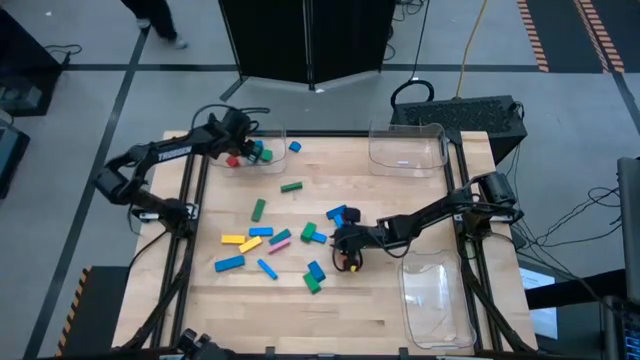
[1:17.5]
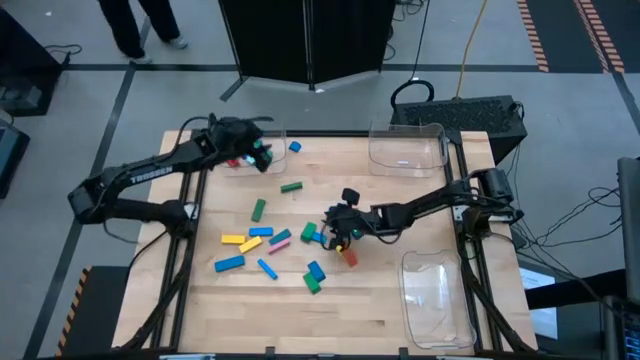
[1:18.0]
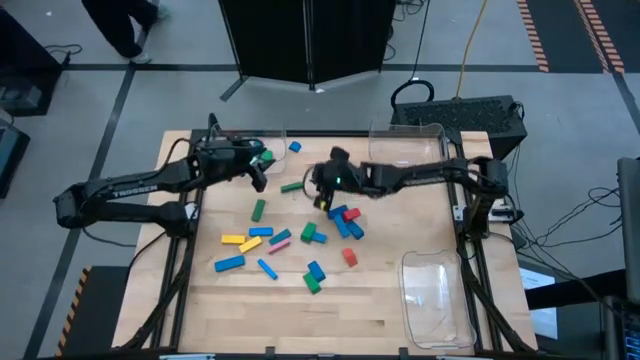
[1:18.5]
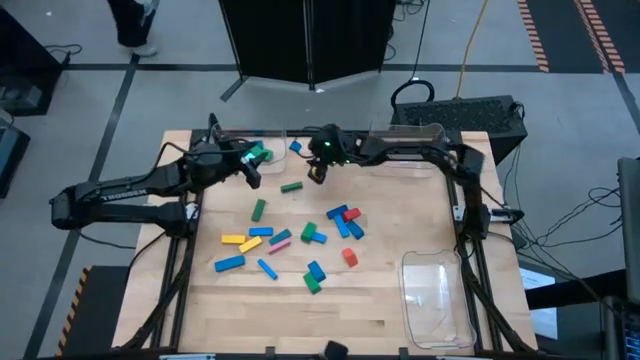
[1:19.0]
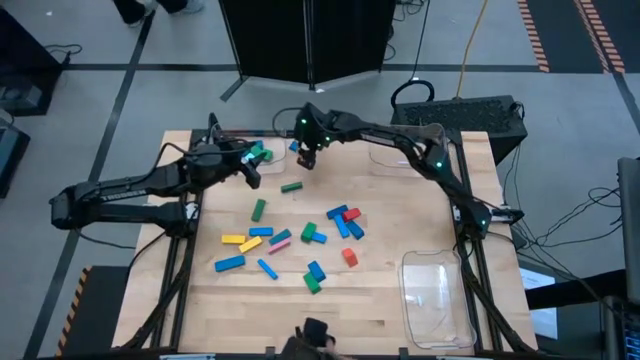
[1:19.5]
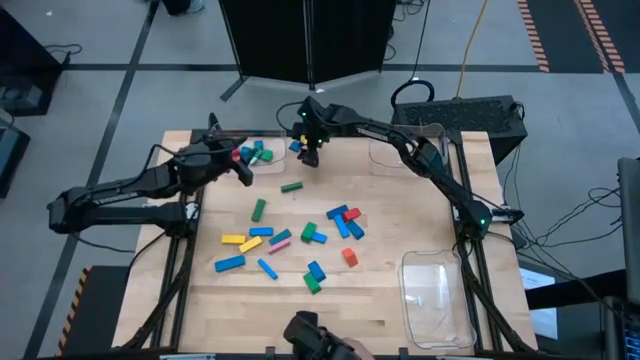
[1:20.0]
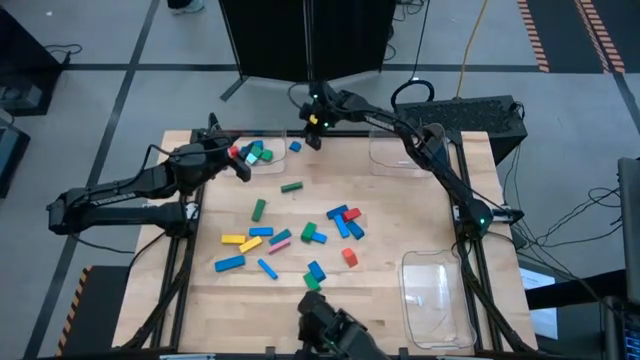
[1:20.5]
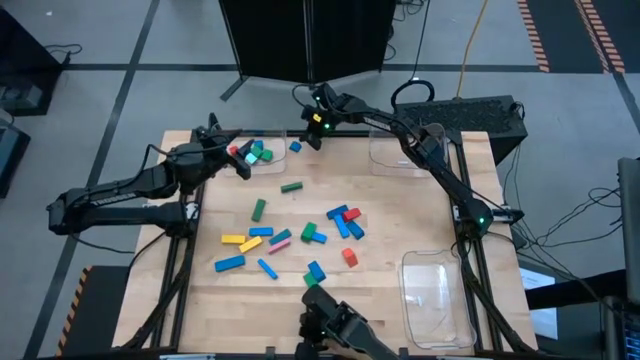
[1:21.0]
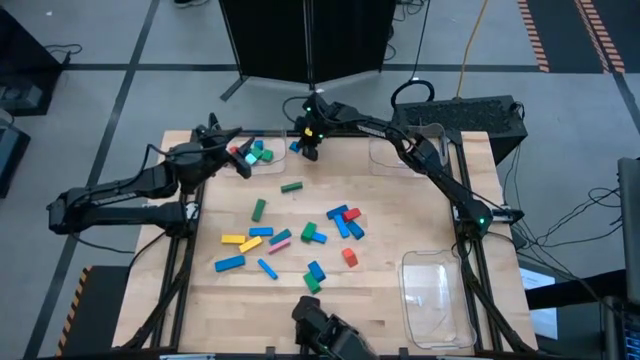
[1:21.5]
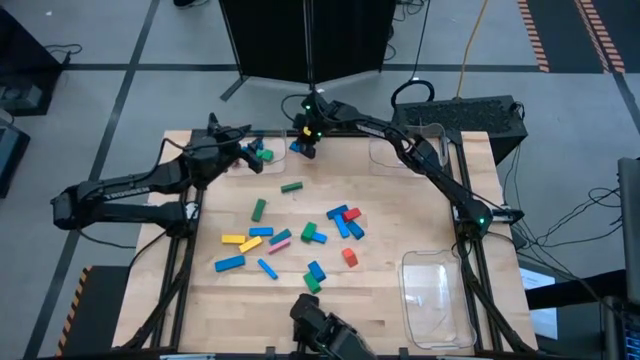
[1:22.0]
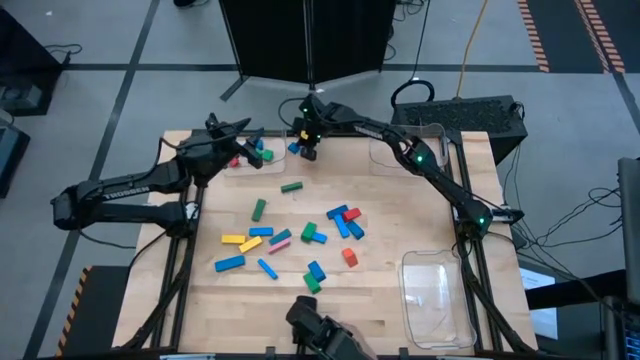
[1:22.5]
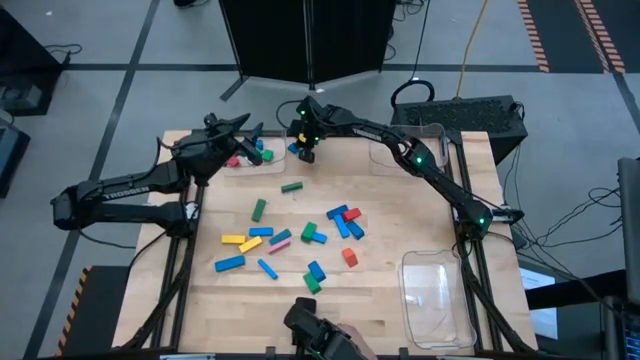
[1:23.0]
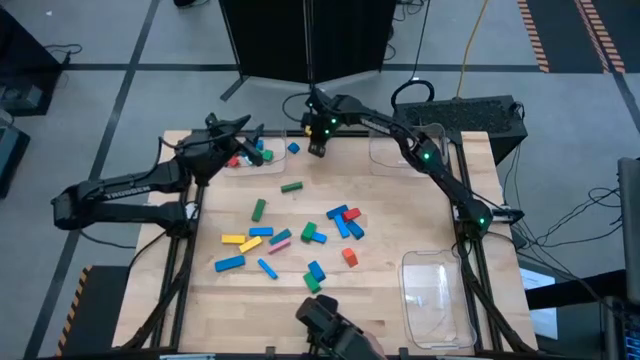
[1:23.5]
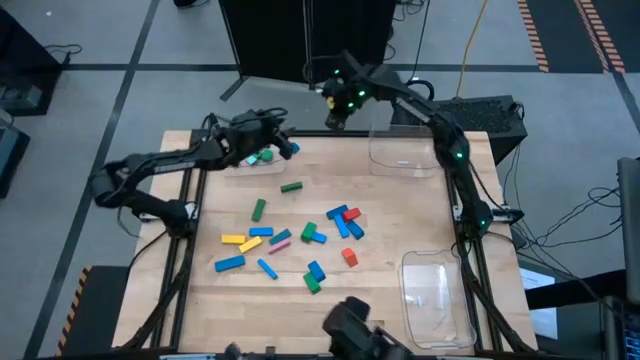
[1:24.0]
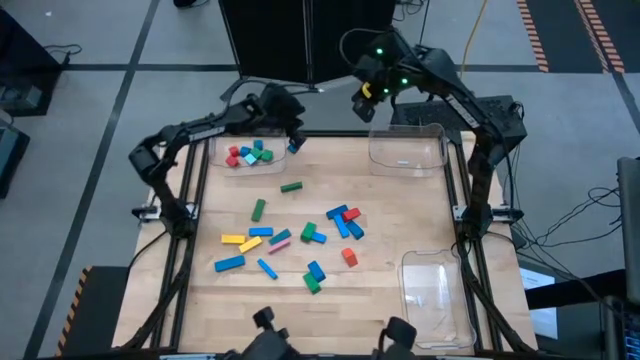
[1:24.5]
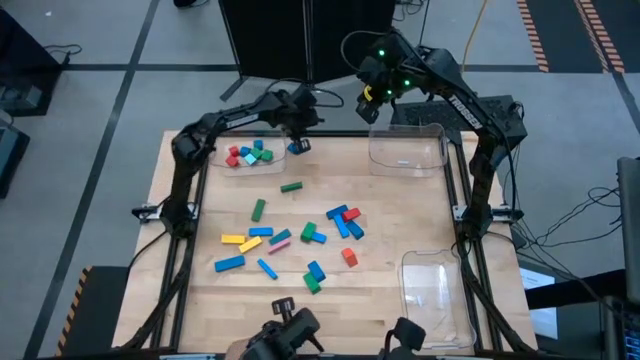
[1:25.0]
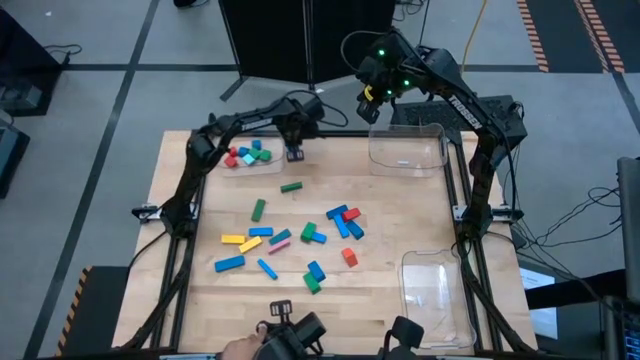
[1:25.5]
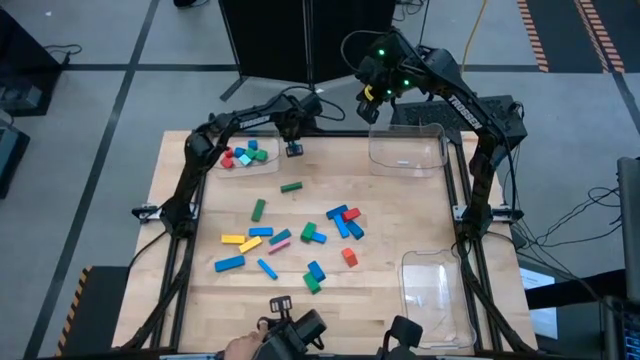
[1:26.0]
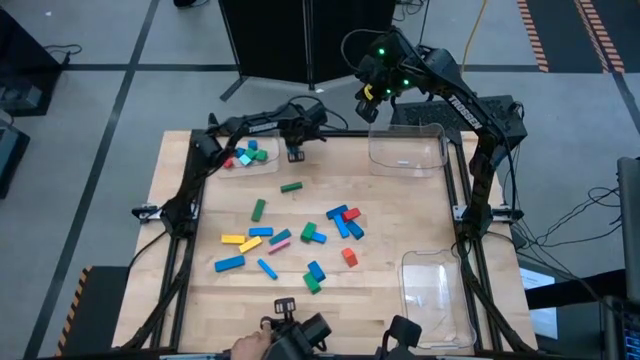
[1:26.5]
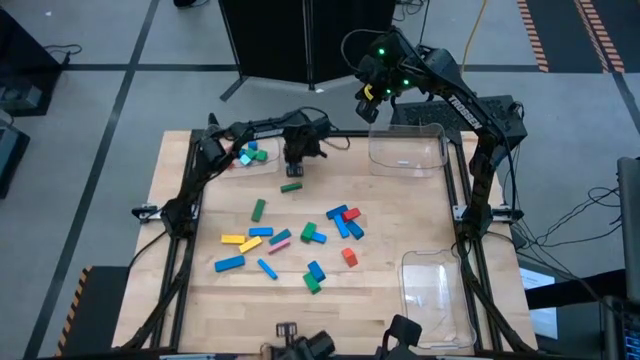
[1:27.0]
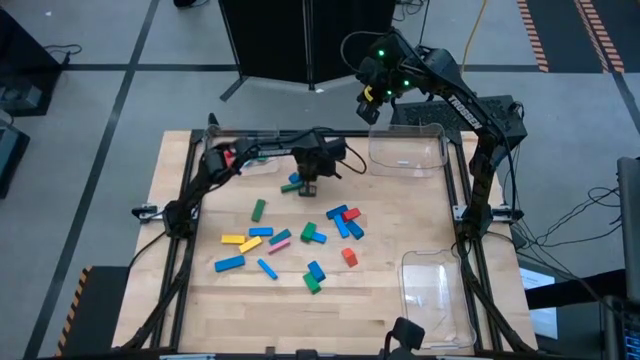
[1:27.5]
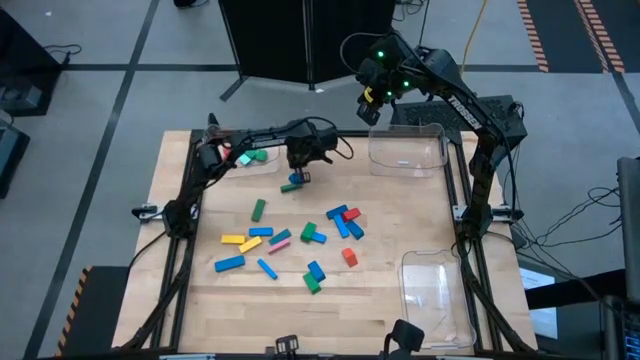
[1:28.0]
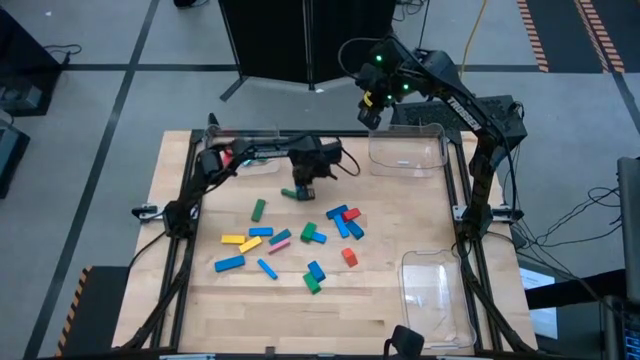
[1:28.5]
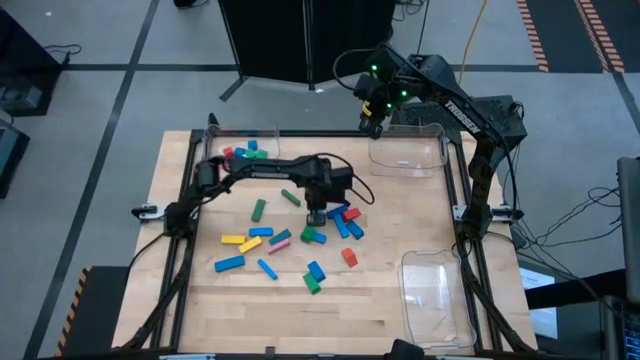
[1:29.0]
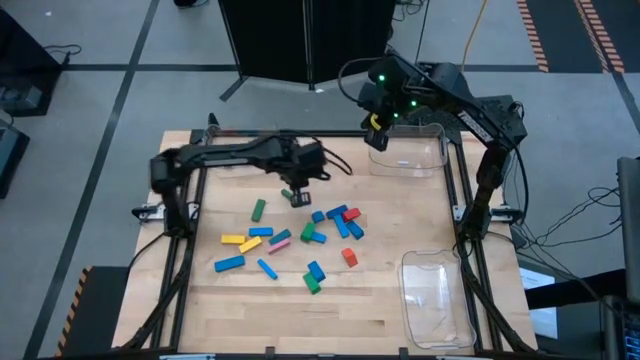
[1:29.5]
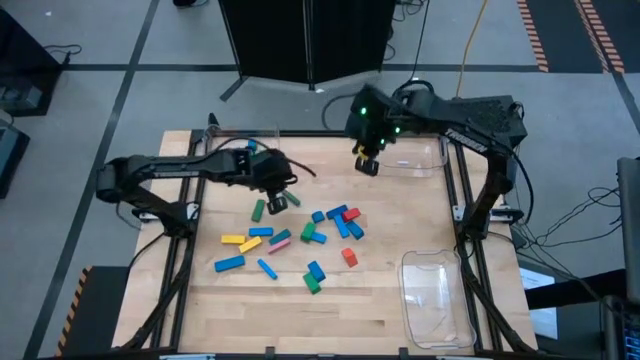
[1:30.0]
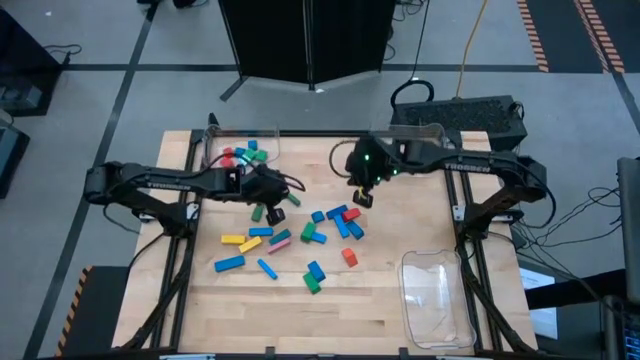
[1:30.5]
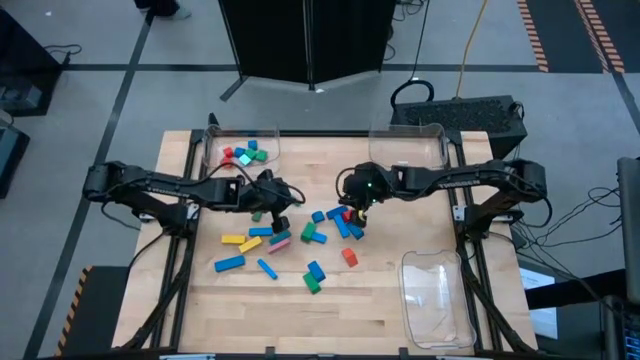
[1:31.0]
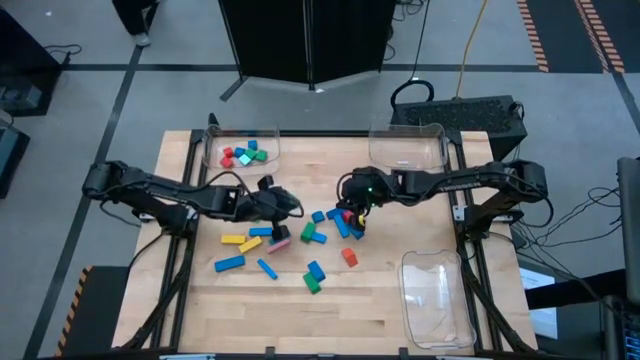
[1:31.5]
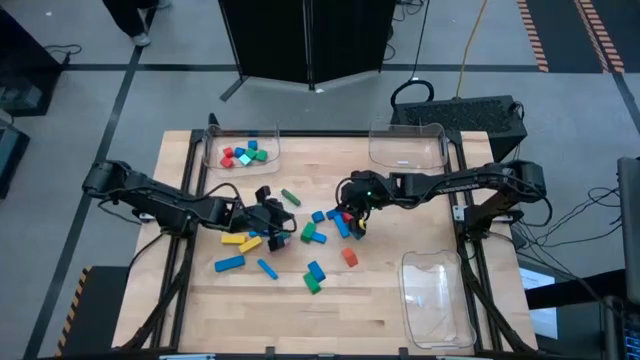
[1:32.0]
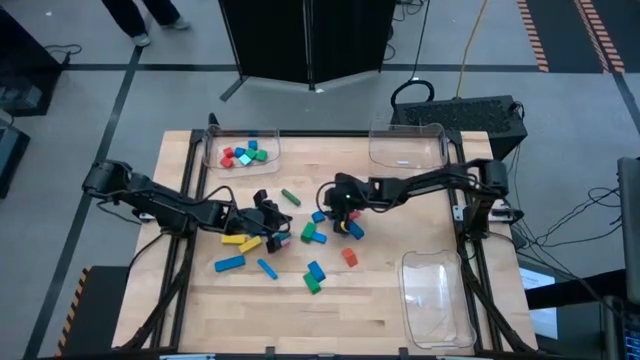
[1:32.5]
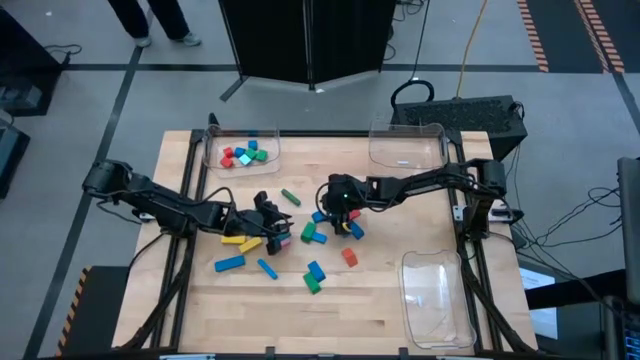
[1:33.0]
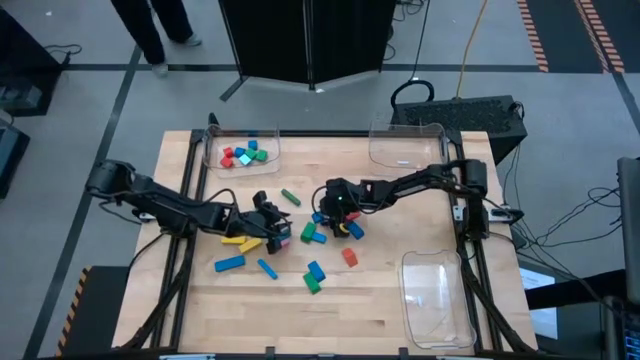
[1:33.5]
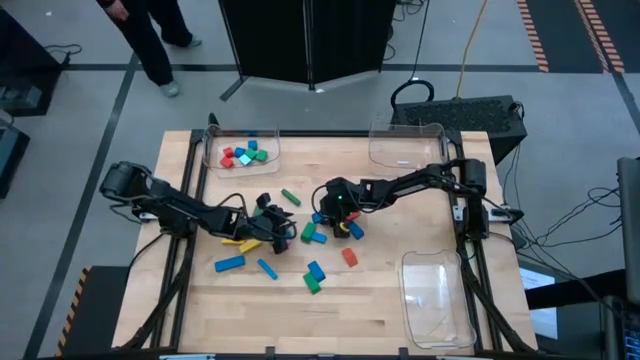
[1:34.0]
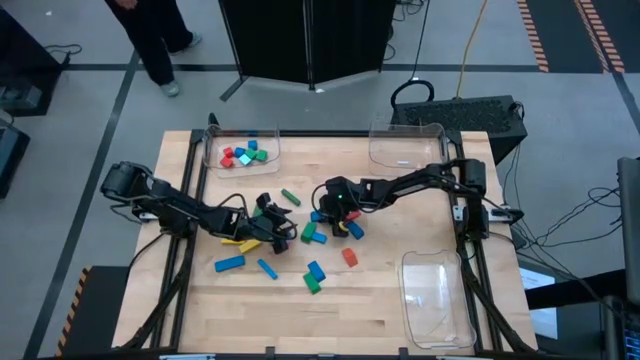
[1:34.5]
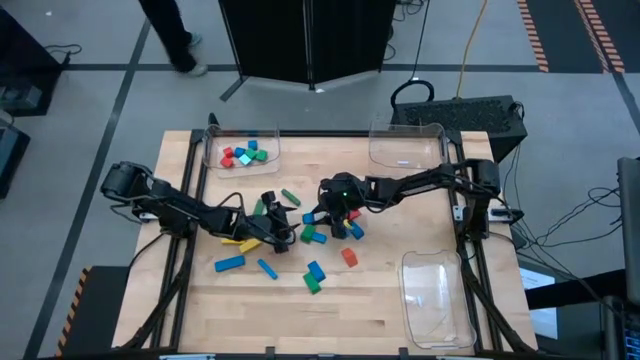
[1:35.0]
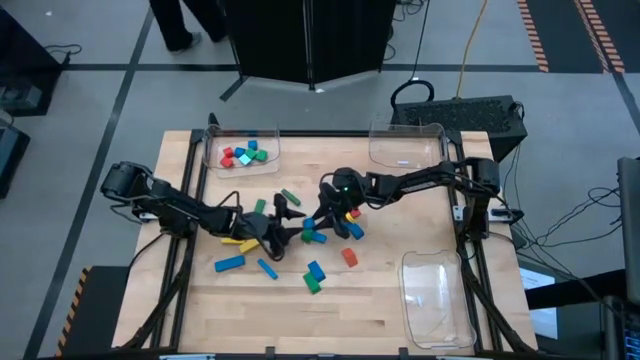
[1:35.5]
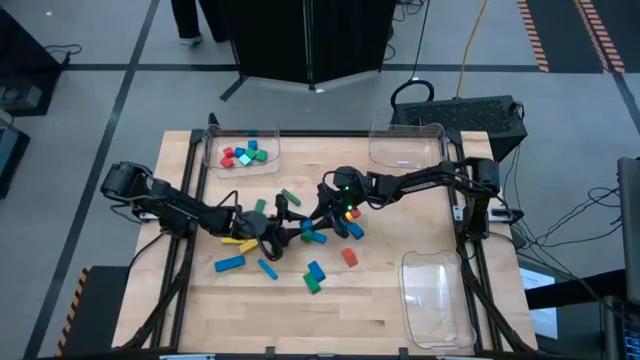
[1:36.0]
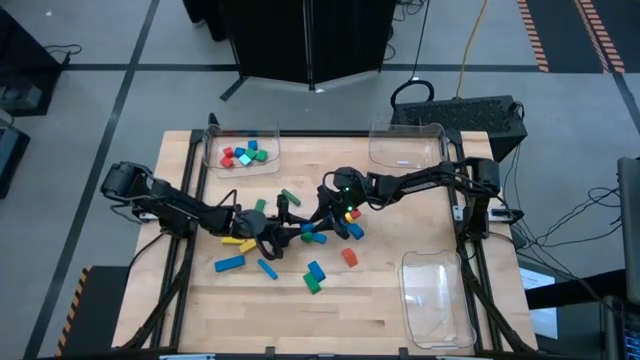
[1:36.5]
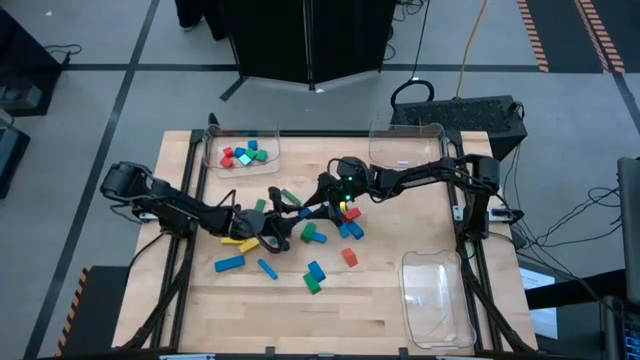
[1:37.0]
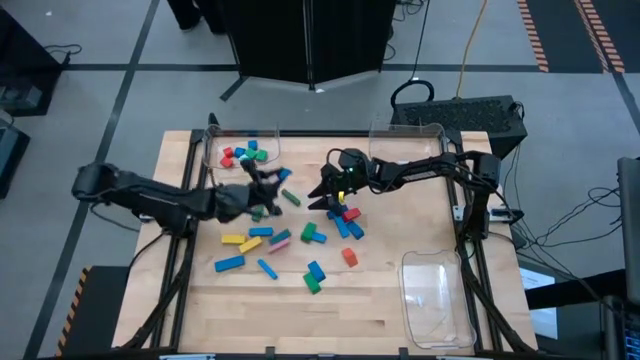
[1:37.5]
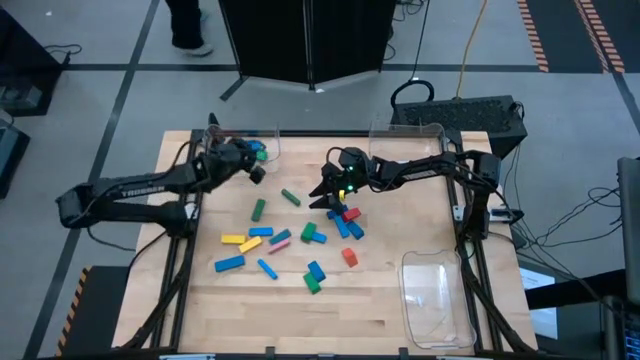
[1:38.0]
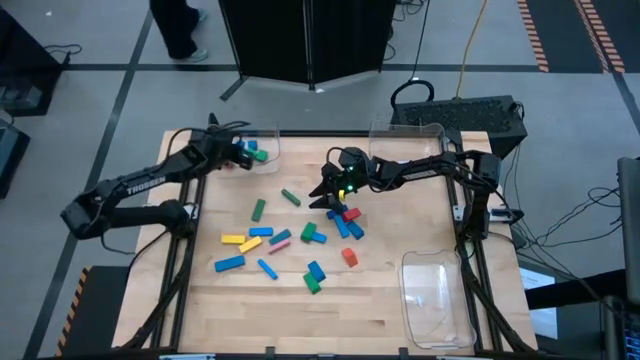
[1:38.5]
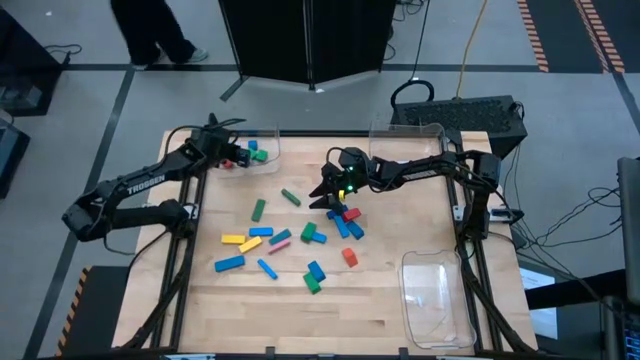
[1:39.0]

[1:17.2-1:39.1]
Task: Sort blocks by size
Put the blue half-circle block into the top left transparent bin
